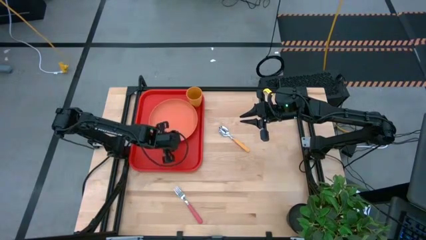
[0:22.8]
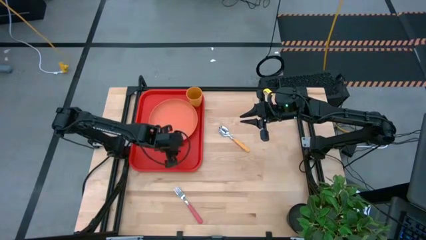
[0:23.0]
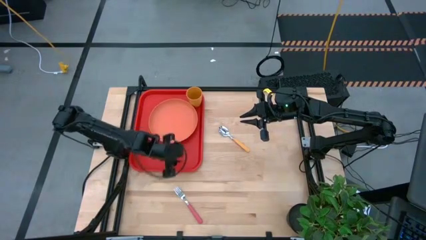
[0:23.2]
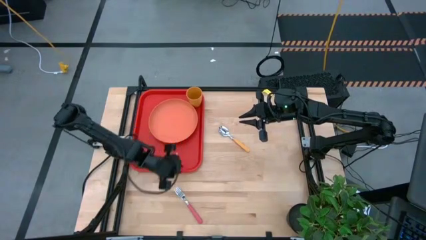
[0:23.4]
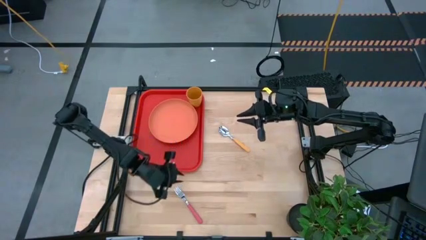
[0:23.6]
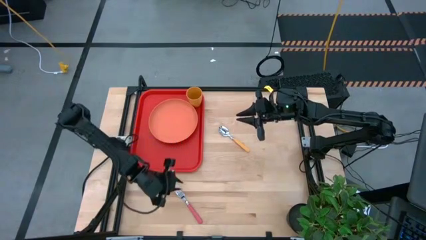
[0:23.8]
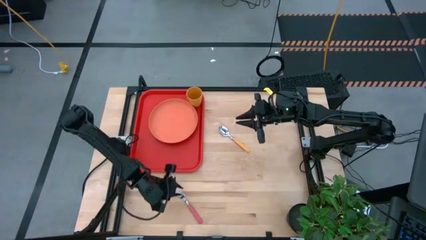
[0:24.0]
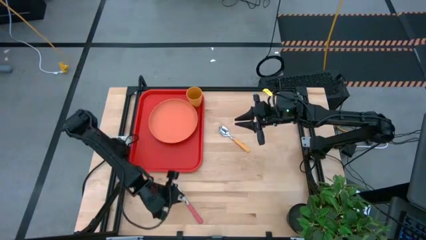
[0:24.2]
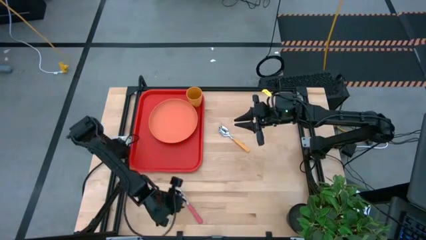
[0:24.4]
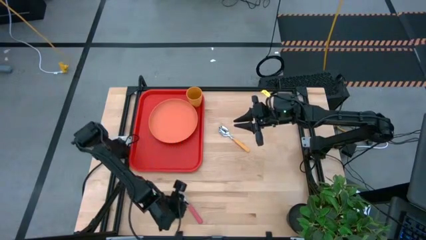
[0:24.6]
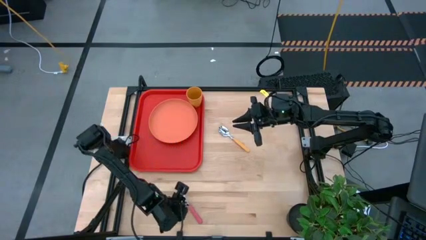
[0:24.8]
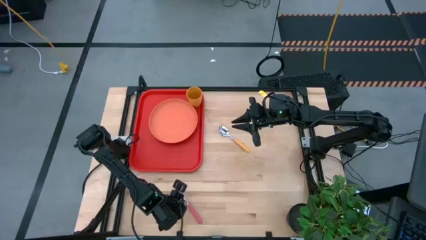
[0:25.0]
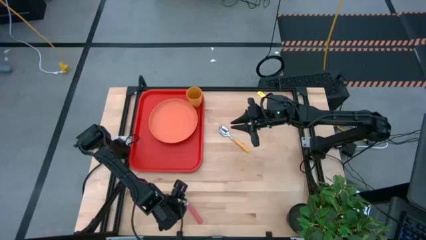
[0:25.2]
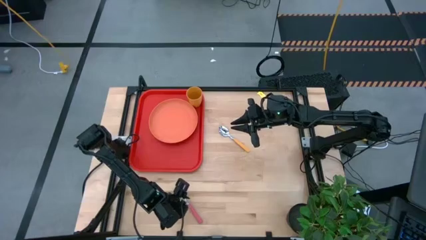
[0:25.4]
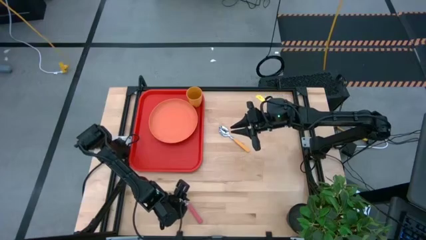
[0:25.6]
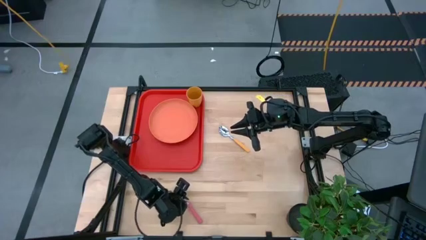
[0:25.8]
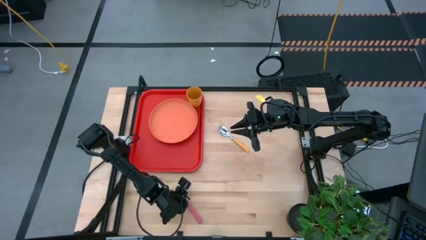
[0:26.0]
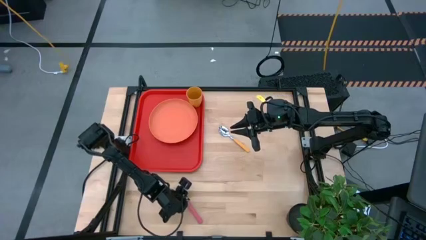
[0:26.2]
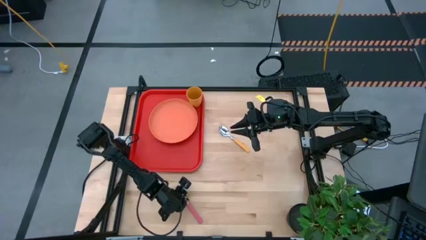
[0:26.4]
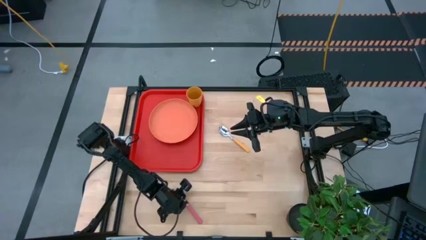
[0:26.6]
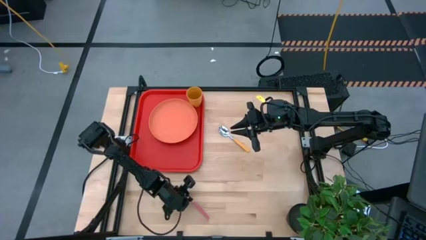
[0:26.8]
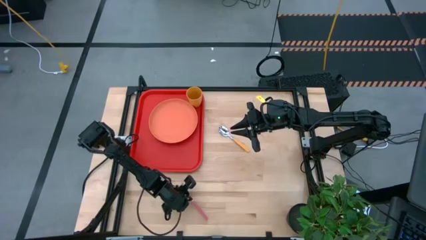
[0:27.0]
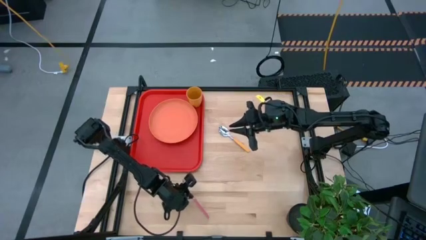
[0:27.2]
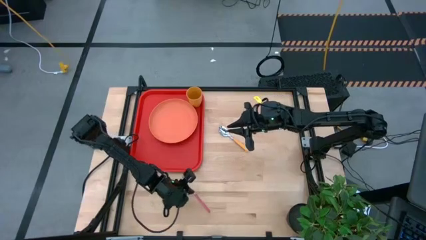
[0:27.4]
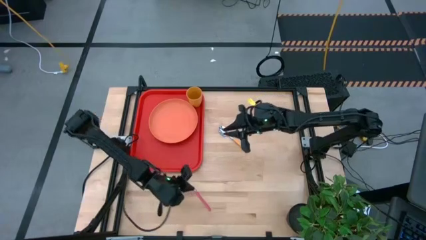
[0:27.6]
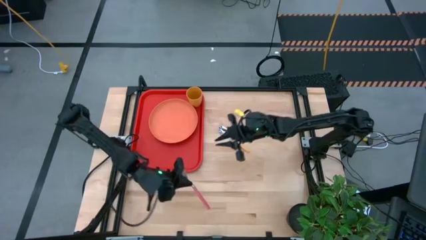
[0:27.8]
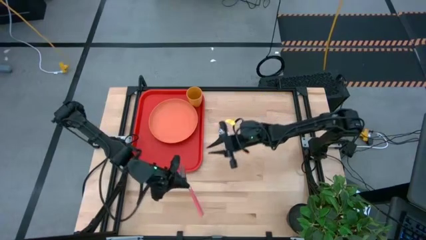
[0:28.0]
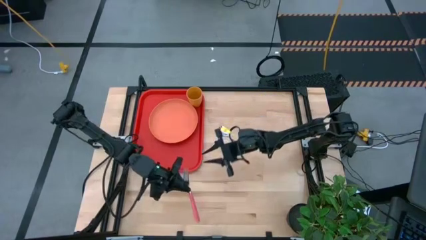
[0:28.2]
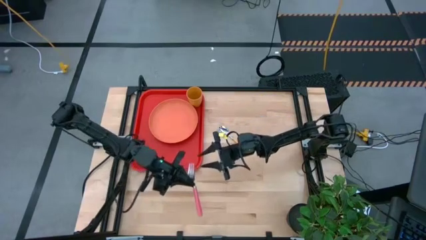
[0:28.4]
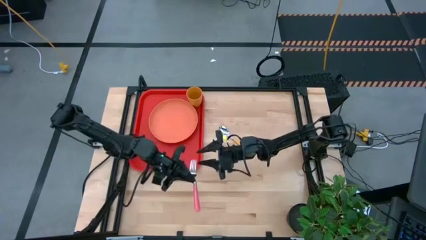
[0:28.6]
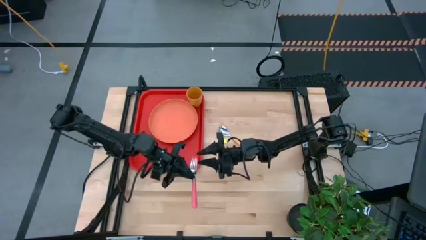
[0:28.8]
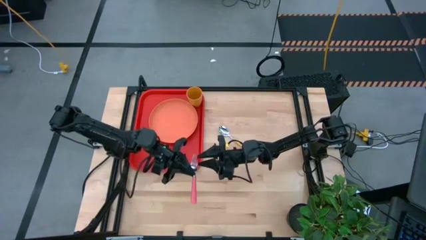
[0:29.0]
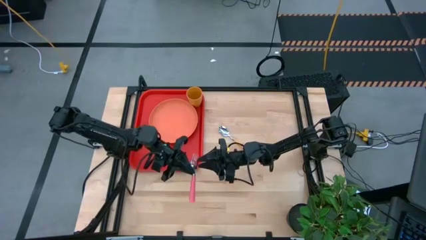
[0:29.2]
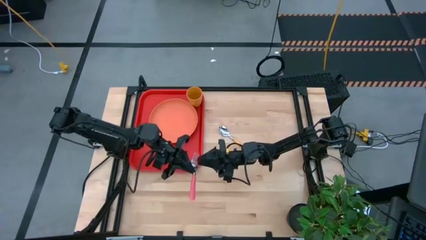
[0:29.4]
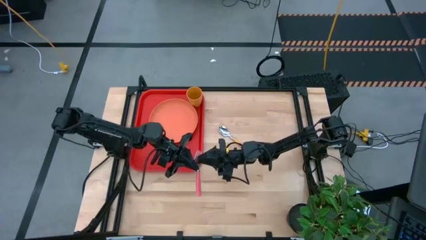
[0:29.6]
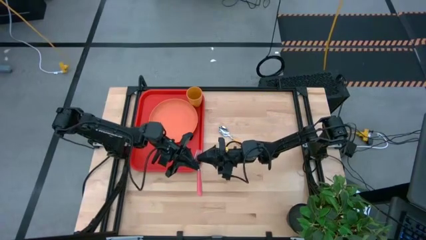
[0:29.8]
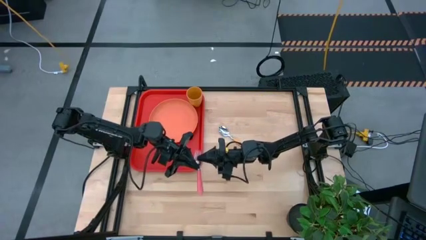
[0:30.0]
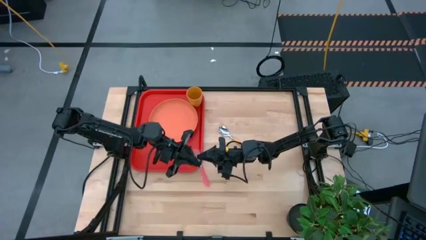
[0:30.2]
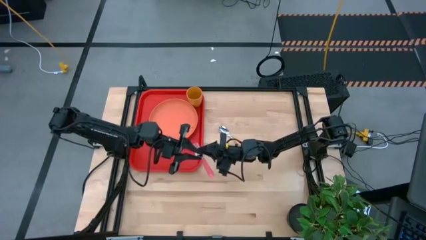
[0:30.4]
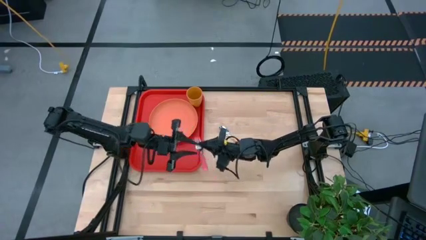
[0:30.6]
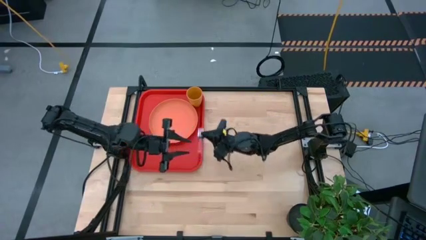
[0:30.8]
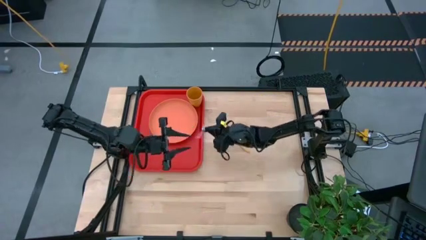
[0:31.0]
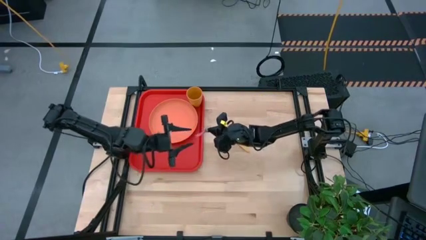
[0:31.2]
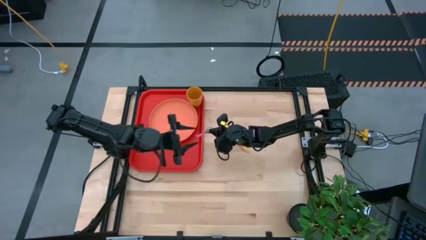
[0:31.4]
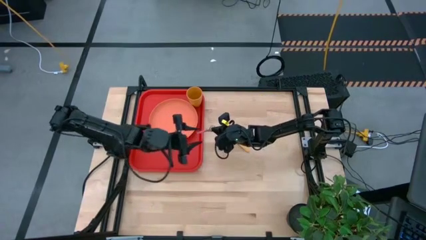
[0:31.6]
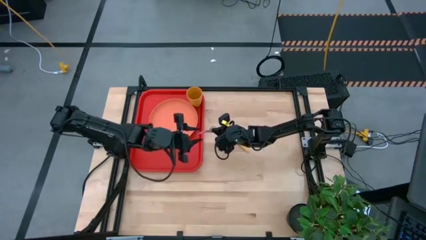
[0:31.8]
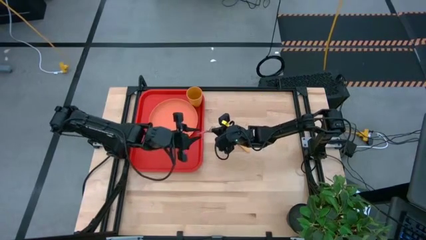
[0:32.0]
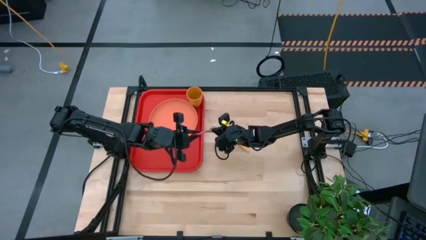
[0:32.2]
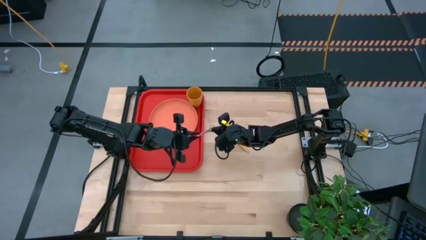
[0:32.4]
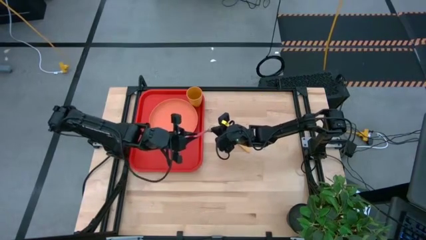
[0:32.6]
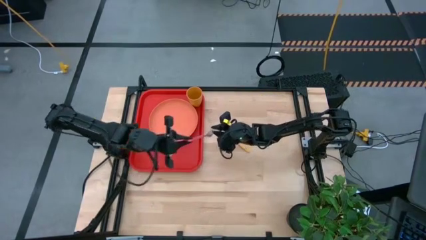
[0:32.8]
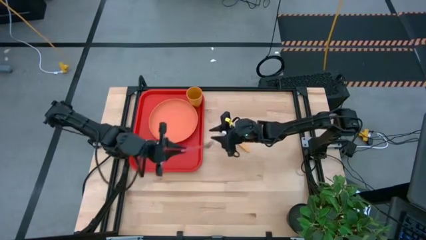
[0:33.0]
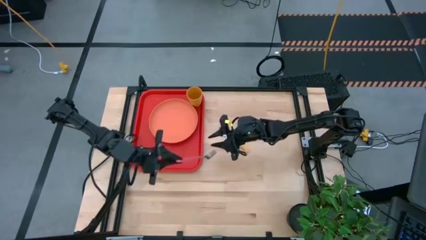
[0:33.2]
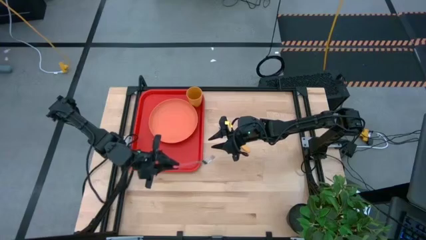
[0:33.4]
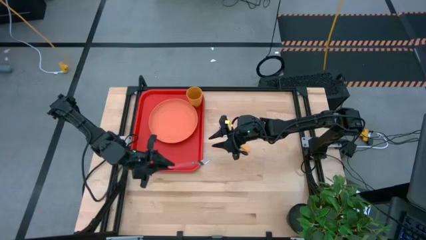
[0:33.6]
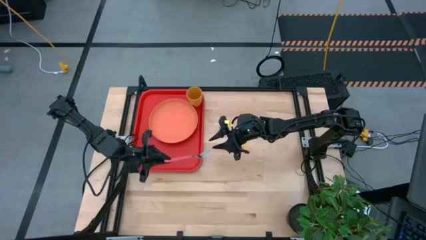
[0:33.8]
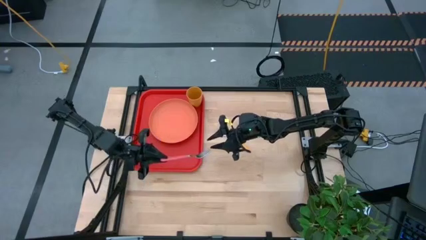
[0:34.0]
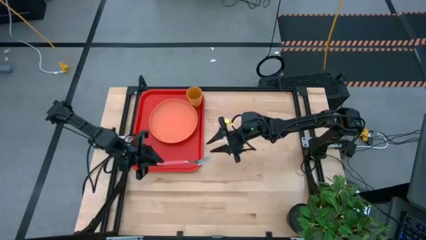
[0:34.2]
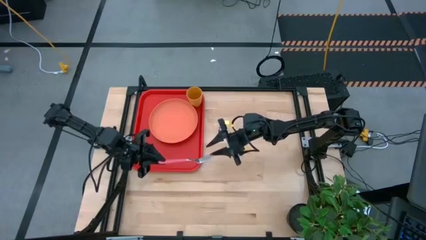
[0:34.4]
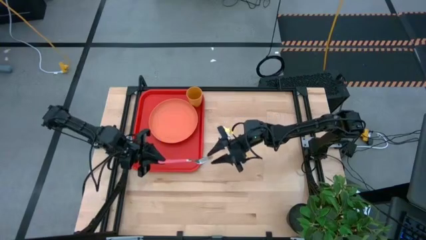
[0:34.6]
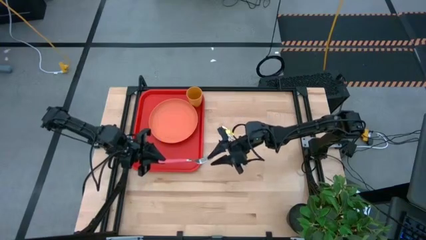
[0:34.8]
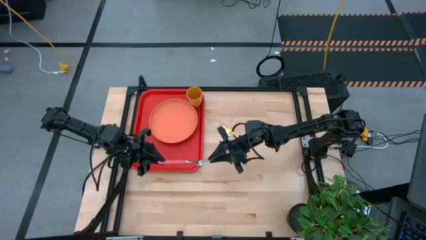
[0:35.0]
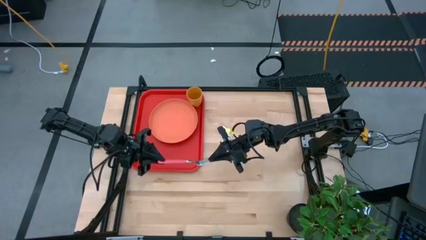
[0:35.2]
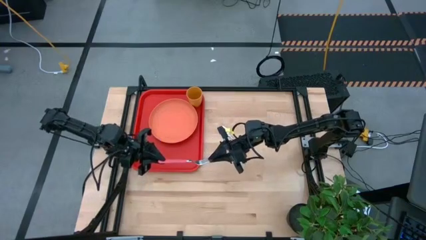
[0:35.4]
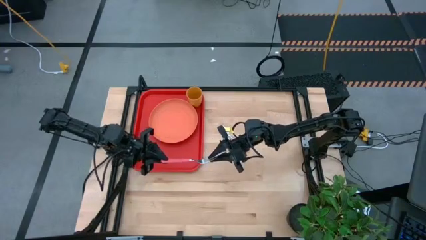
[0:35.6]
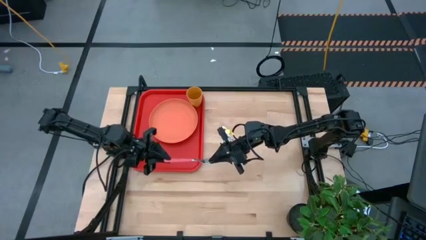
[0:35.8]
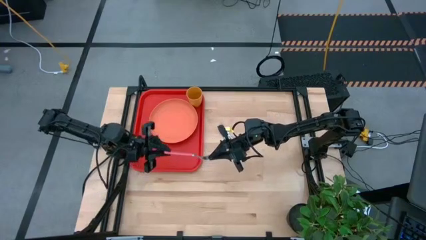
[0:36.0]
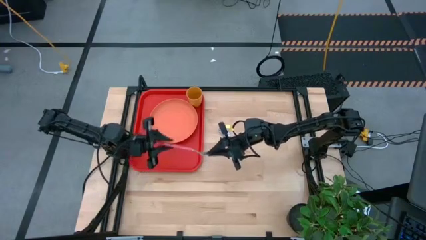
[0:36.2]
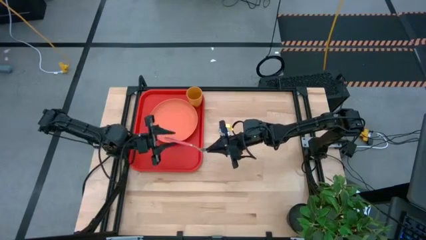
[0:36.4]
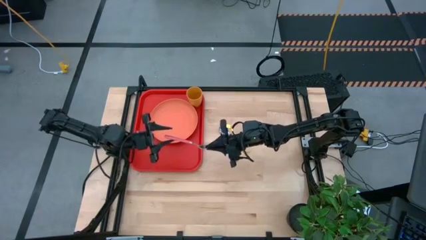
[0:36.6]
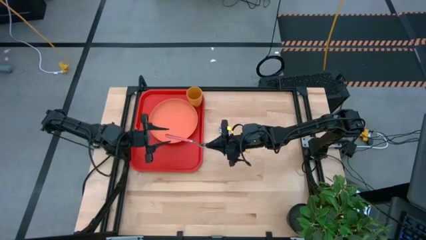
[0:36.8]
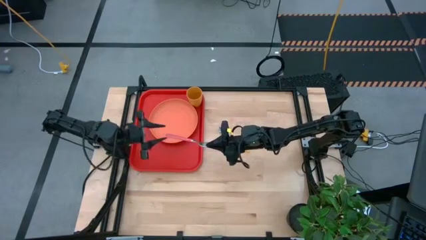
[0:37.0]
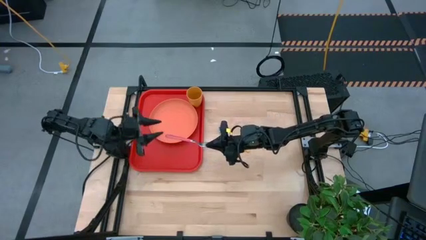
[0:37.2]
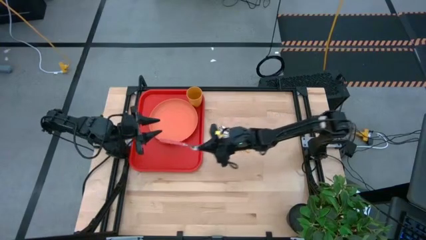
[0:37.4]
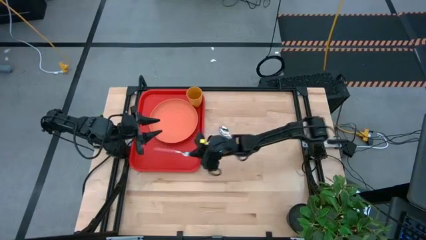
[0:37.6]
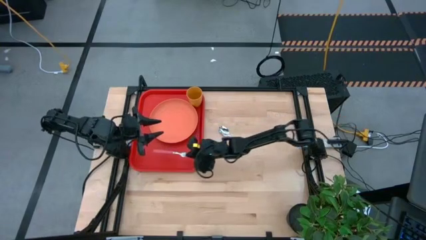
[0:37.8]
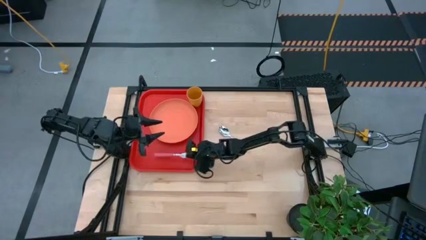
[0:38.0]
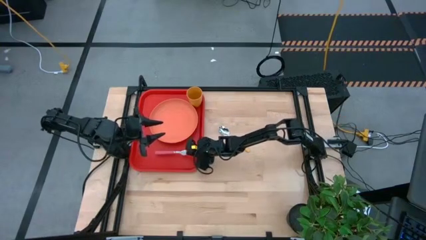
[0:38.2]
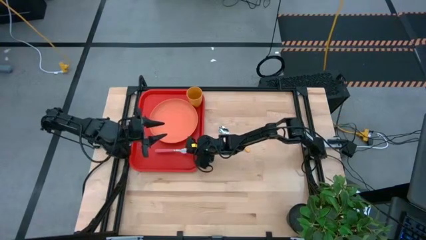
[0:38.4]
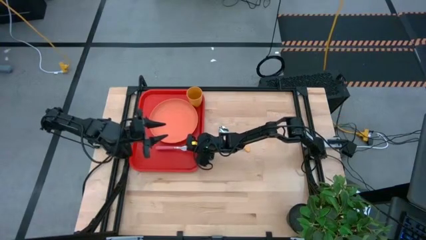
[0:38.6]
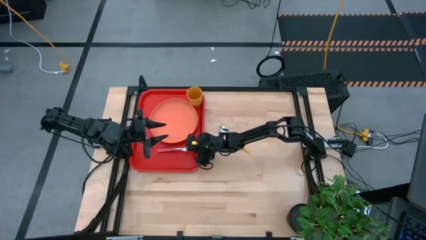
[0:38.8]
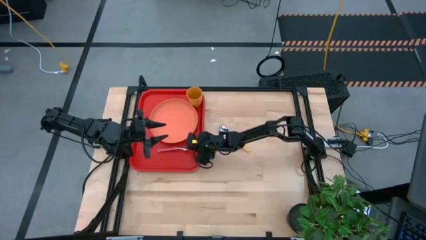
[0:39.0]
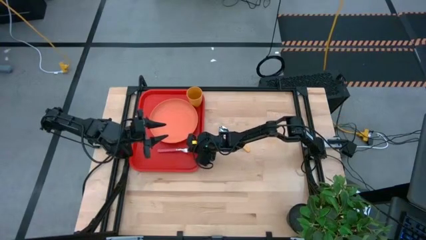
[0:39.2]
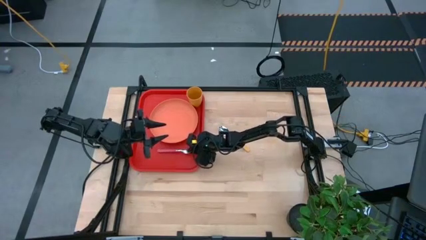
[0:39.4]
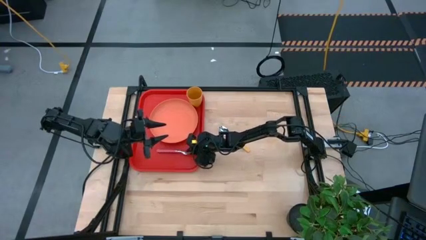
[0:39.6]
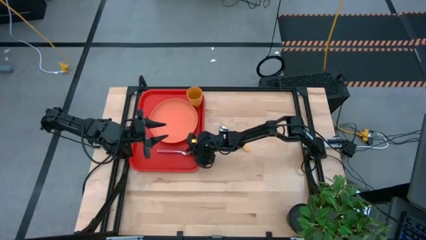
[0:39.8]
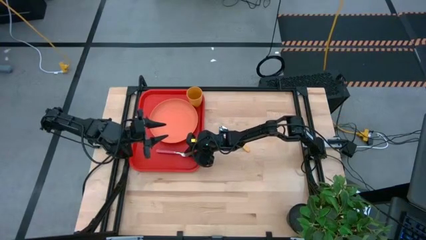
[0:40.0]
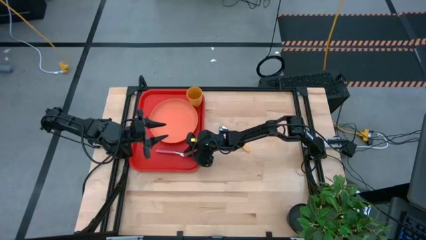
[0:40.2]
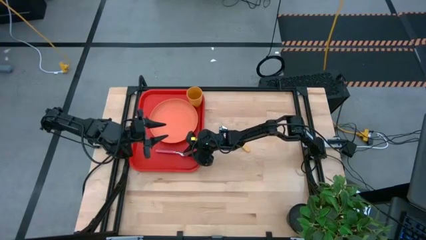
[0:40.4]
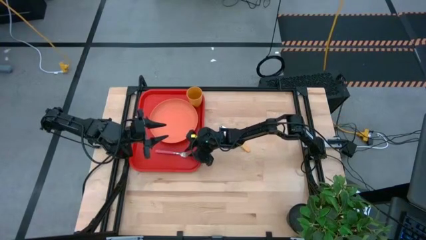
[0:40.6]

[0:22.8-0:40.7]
Task: Pick and place plate/cup/fork/spoon on tray
Put the pink fork on the red serving tray at the bottom of the orange plate
